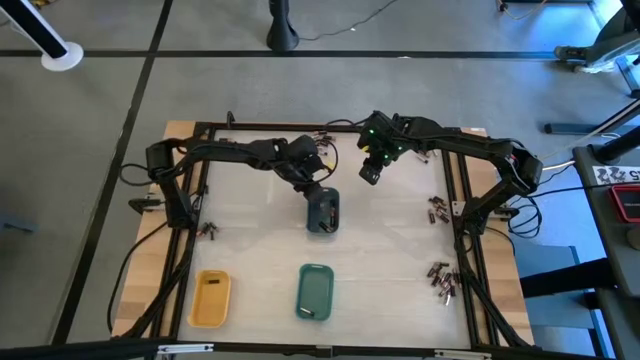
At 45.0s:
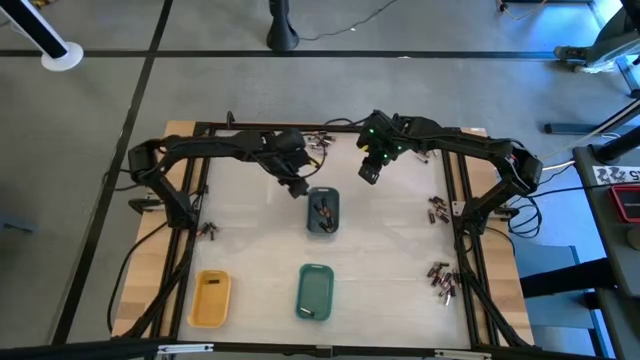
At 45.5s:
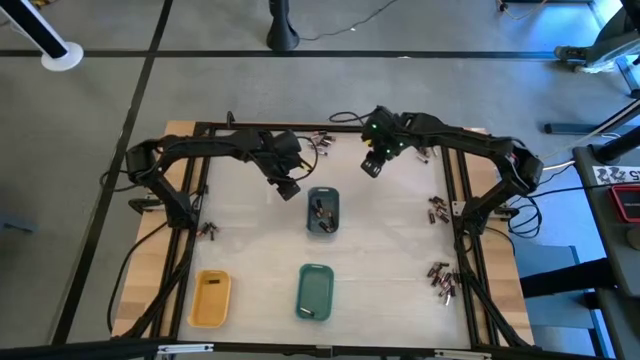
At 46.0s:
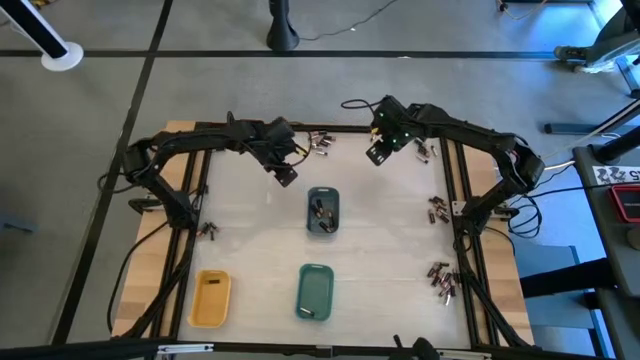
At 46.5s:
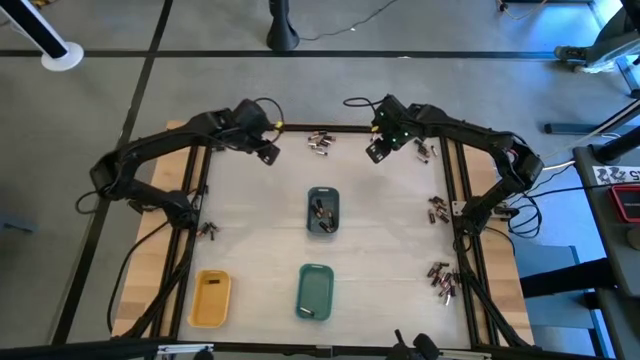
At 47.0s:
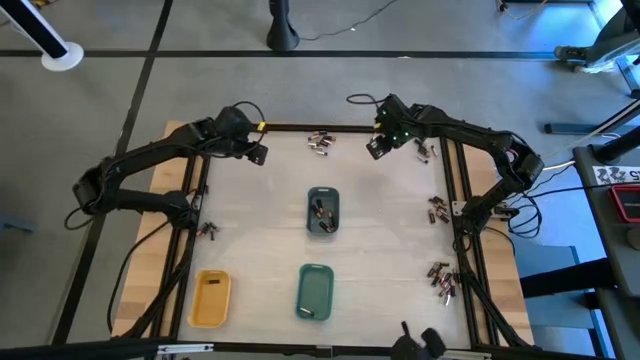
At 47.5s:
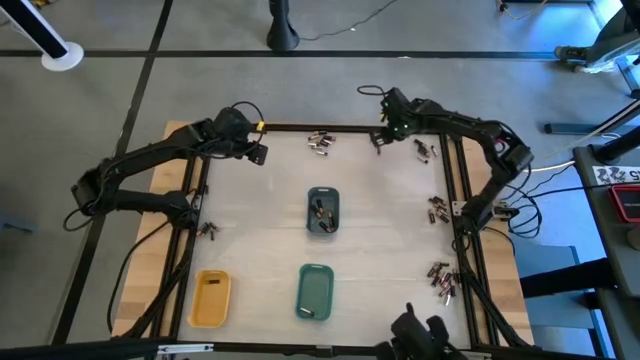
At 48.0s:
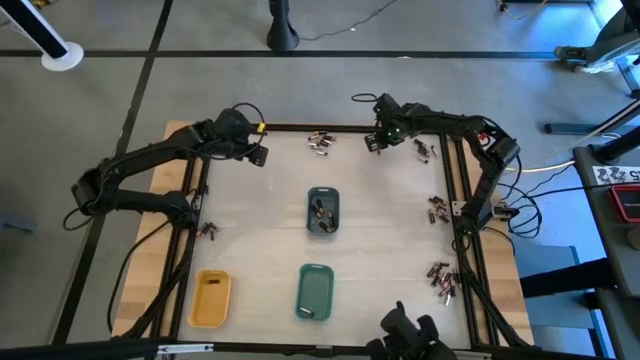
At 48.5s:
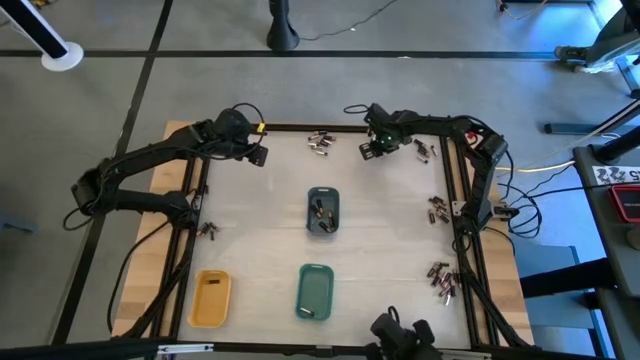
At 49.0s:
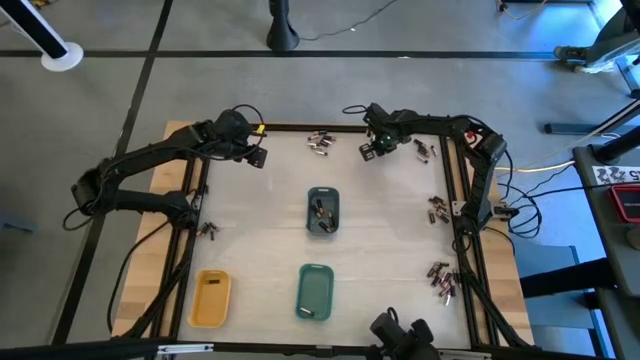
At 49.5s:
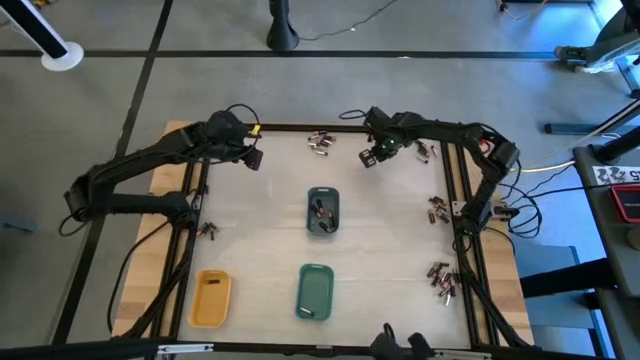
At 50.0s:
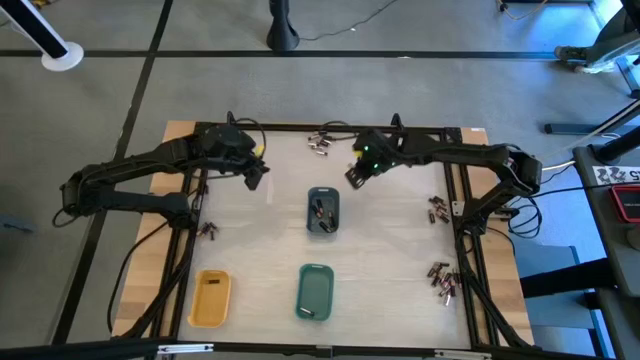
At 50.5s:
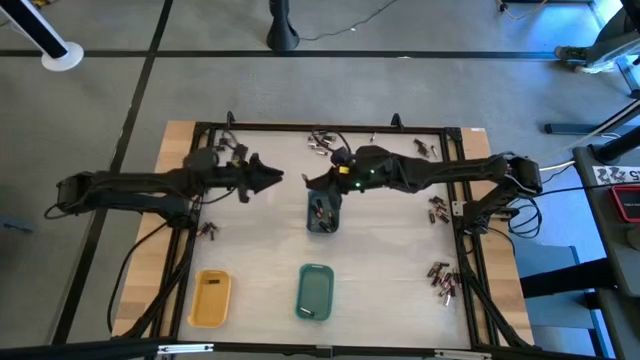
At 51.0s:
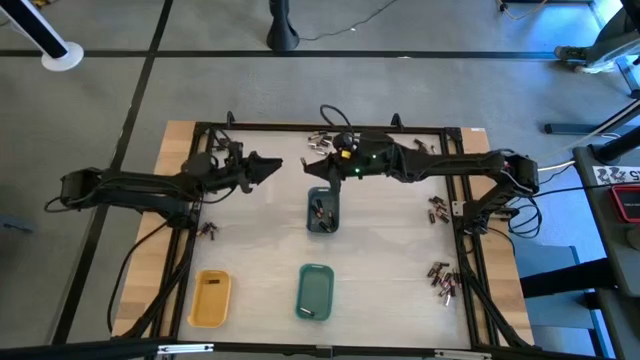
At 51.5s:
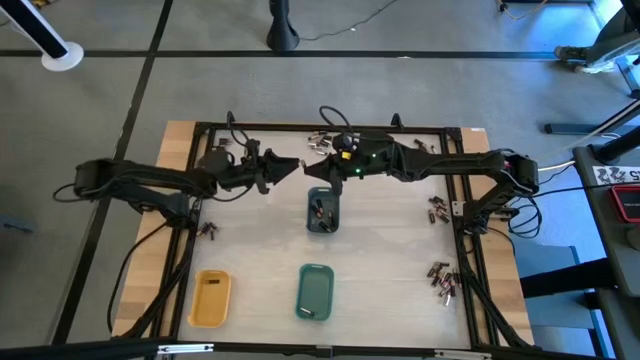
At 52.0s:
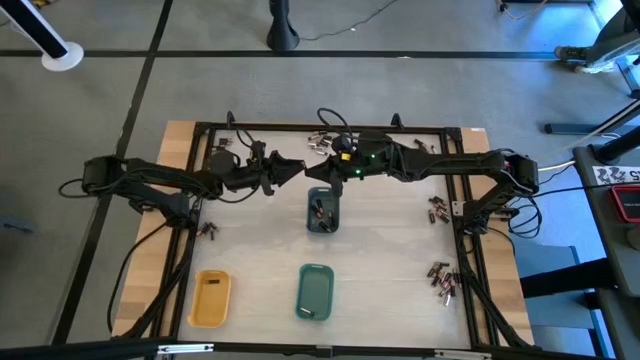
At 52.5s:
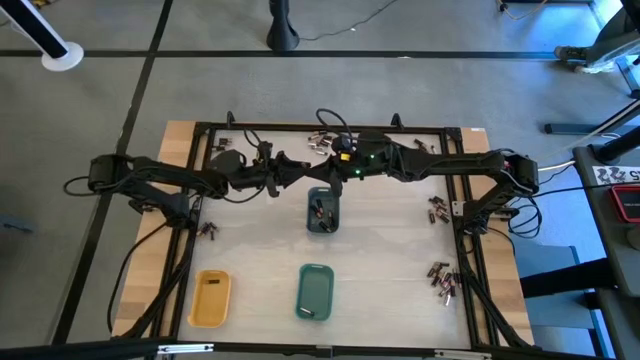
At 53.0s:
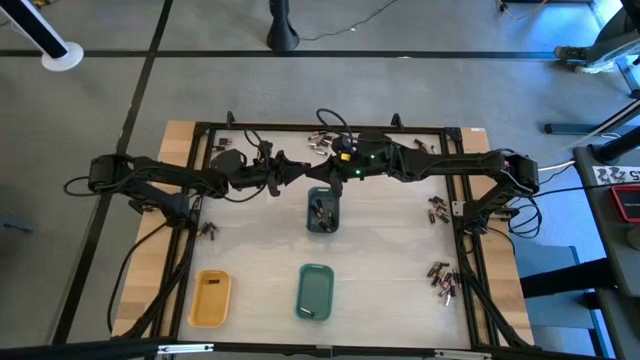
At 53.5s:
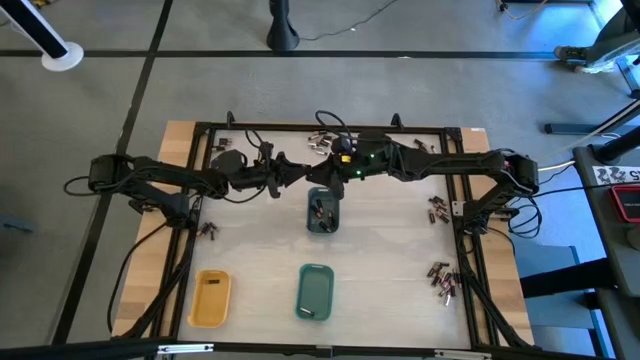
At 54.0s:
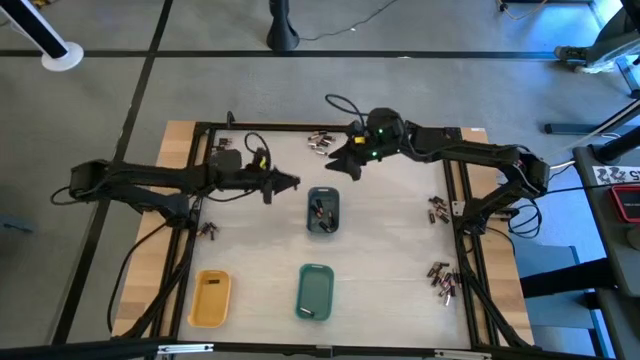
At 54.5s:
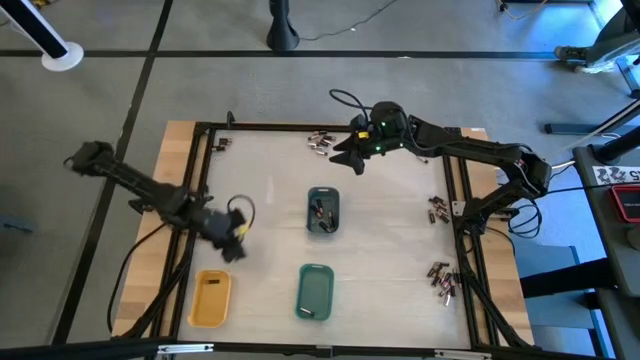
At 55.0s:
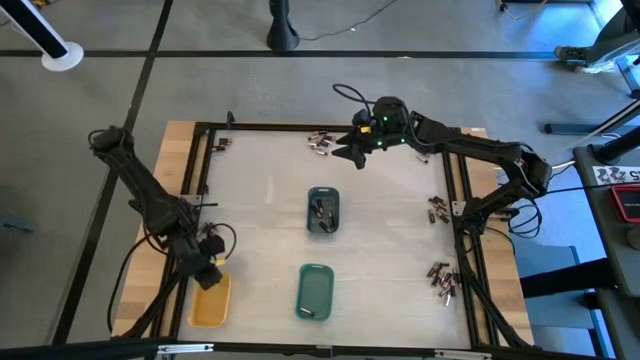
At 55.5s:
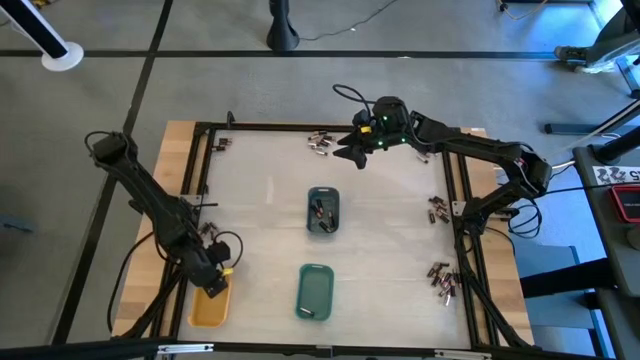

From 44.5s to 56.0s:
Task: Sort batteries
Put the small black battery into the yellow bin

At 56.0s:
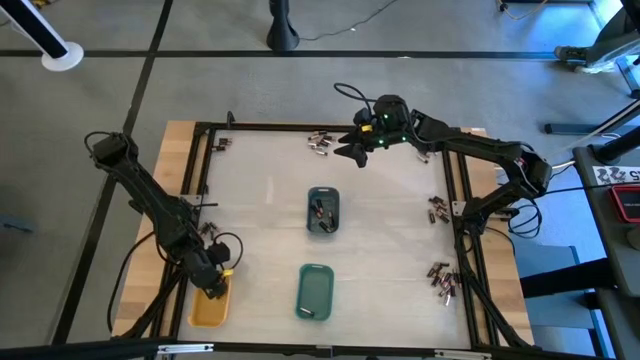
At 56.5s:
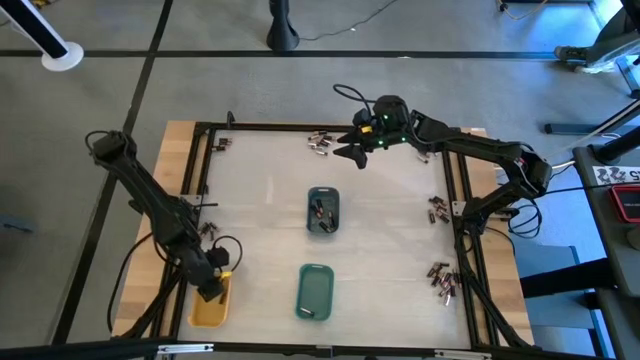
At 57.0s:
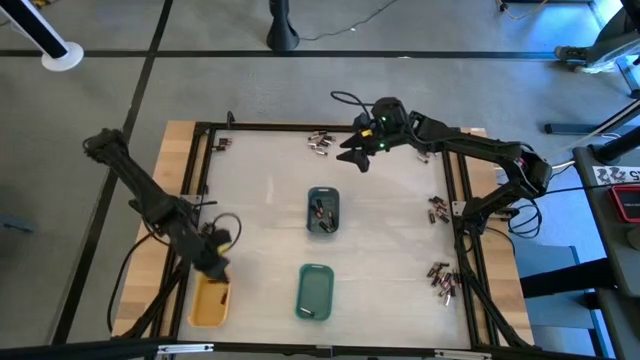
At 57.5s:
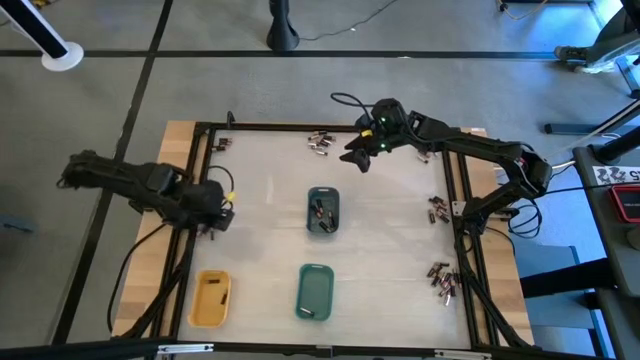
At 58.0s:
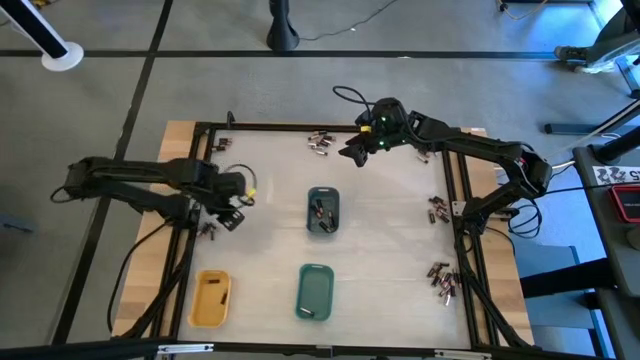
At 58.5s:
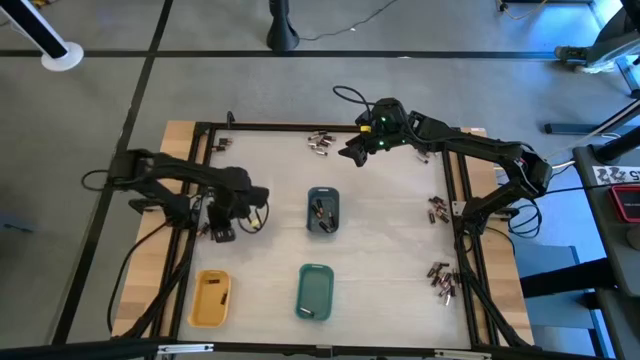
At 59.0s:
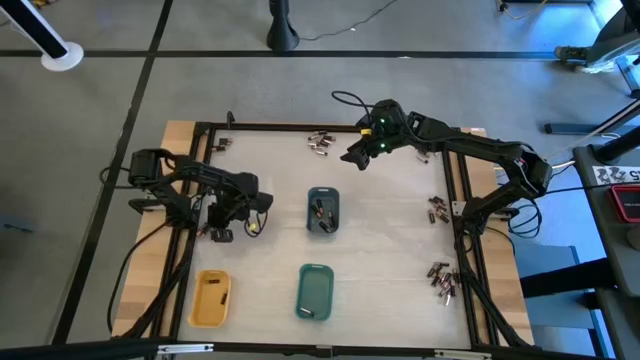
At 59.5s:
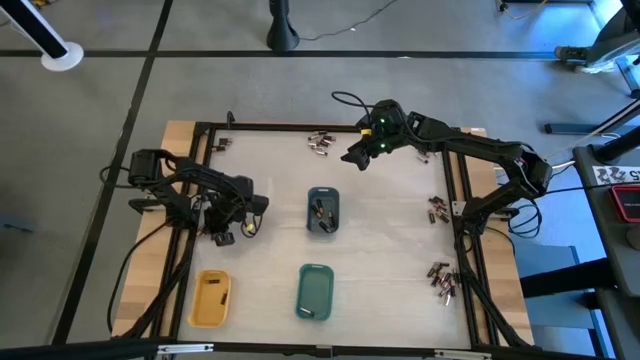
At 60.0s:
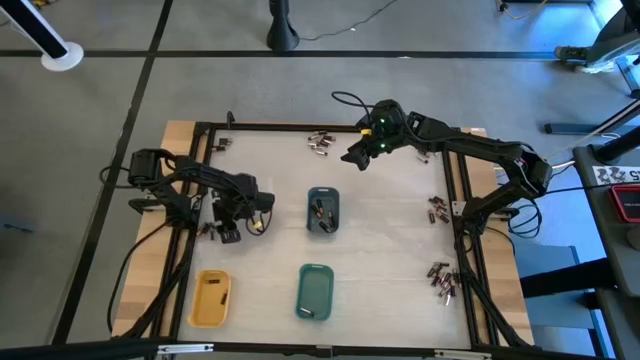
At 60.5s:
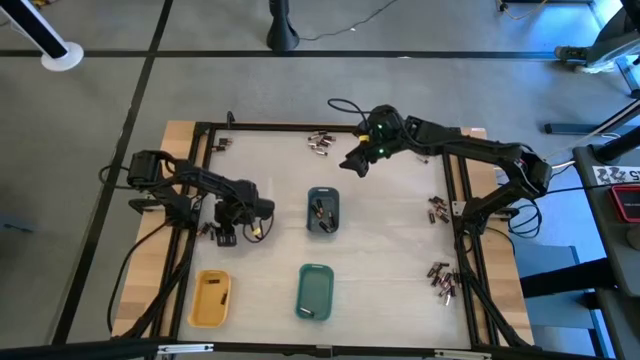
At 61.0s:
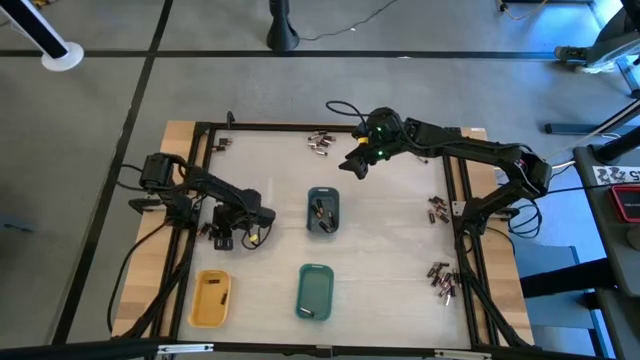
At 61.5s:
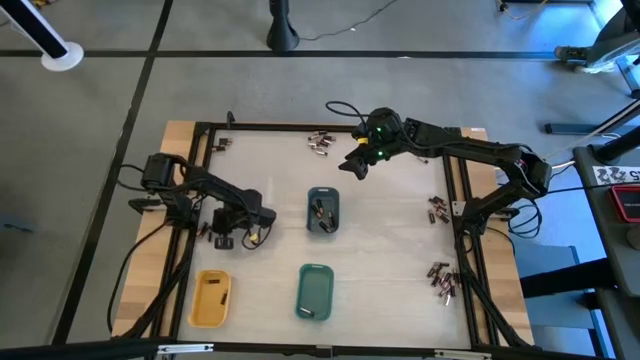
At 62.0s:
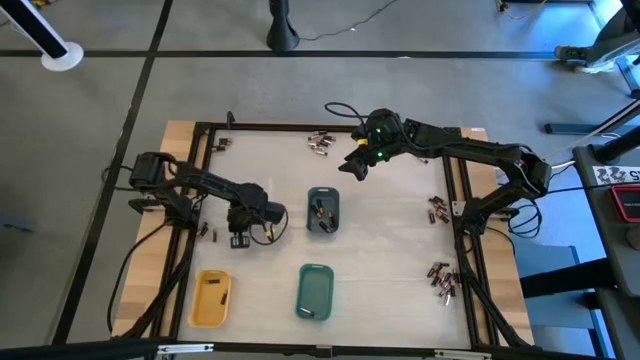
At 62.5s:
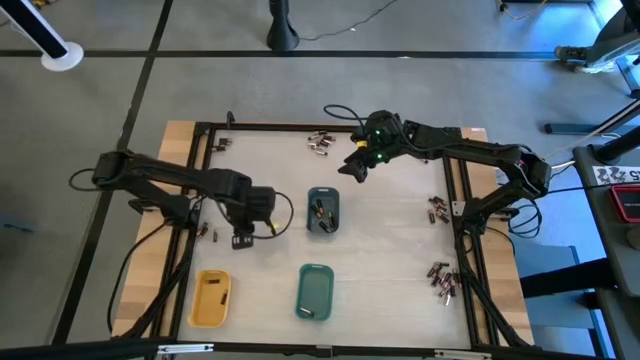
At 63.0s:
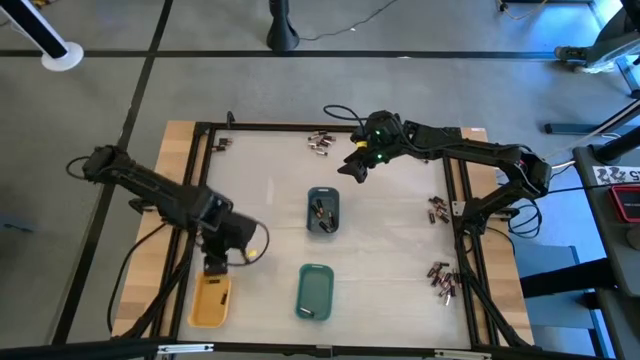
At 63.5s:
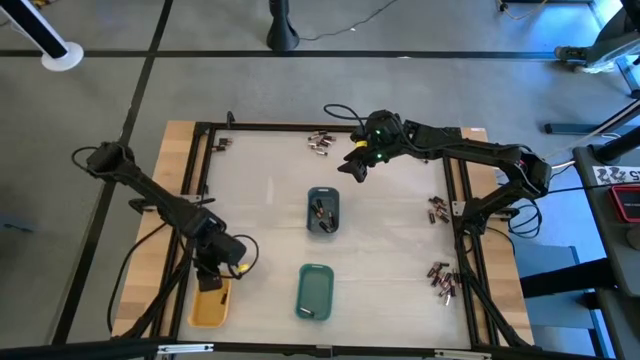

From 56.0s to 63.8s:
Put the small black battery into the yellow bin

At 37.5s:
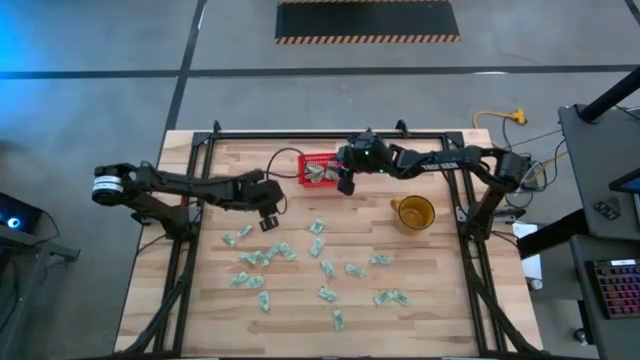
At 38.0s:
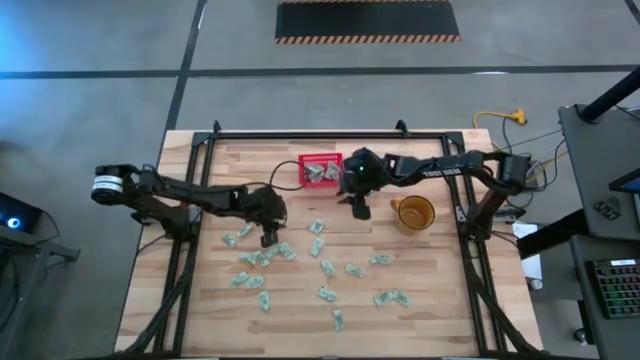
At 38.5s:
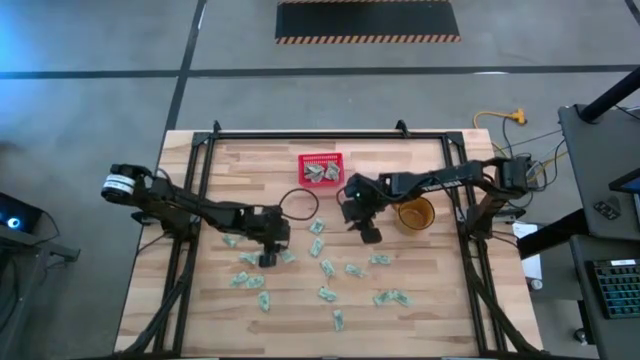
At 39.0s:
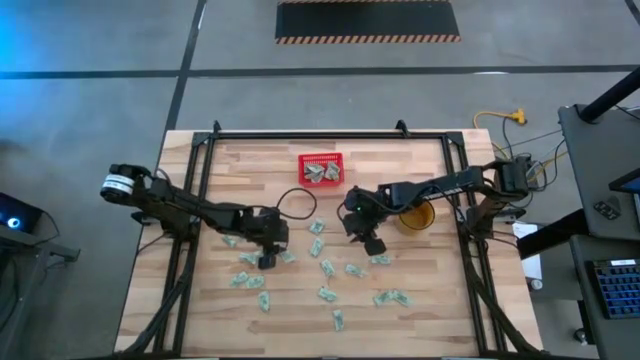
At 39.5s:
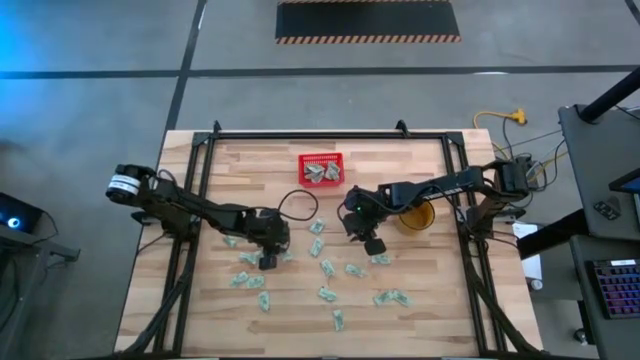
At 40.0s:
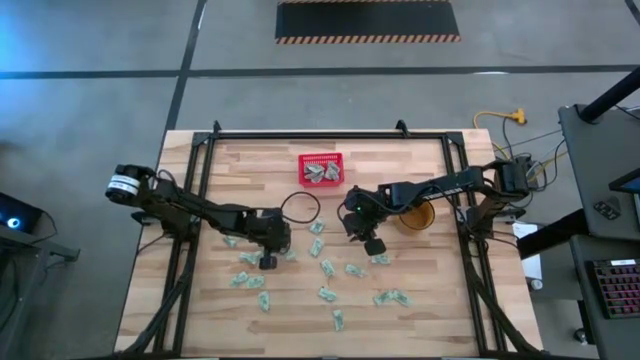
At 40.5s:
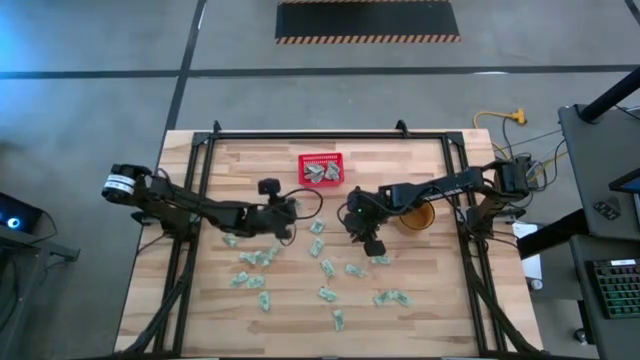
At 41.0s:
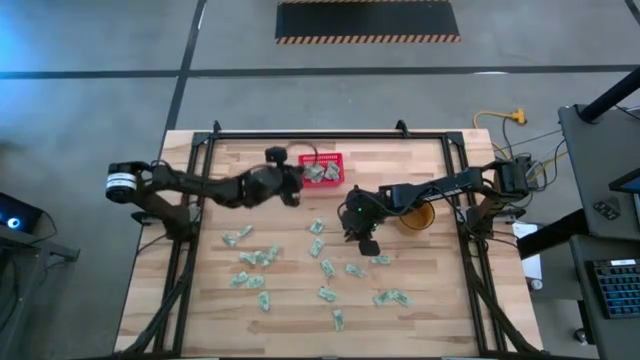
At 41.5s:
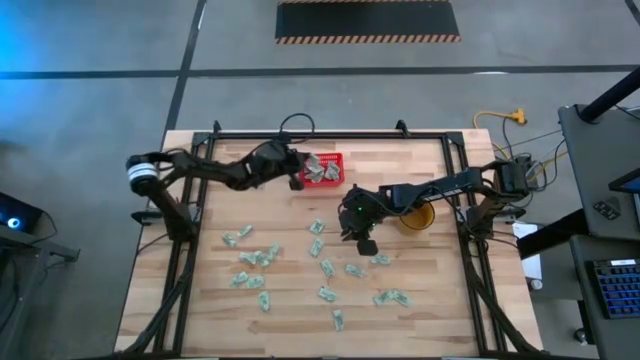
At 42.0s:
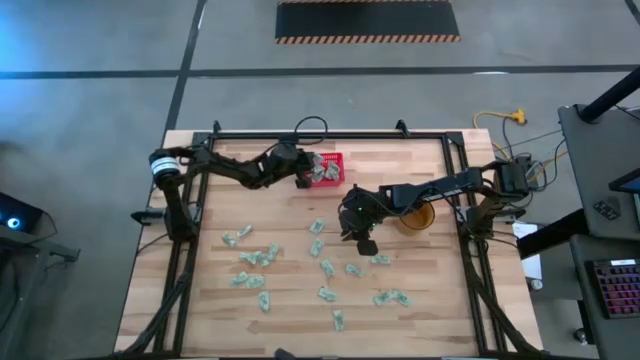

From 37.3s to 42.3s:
Task: Pick and place Stevia / Truvia into bins
Put the white stevia packet into the red bin
